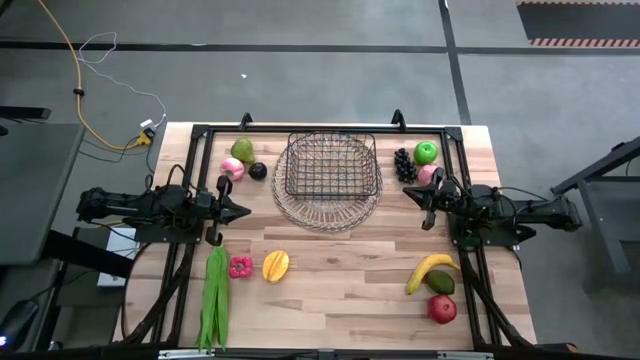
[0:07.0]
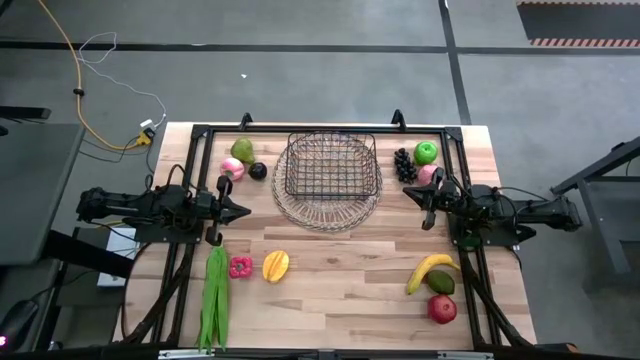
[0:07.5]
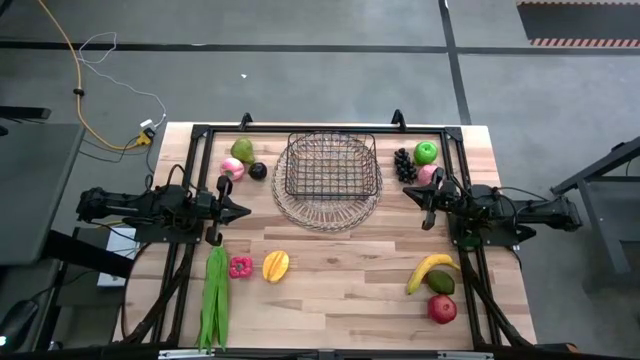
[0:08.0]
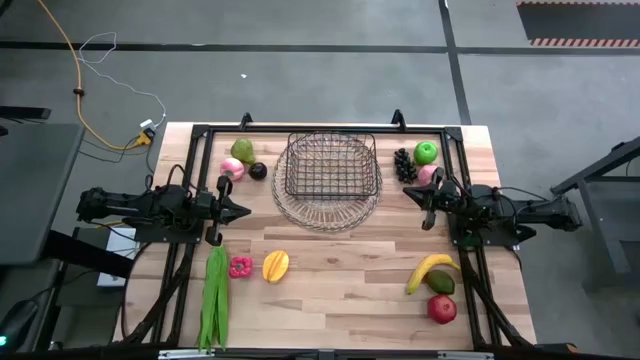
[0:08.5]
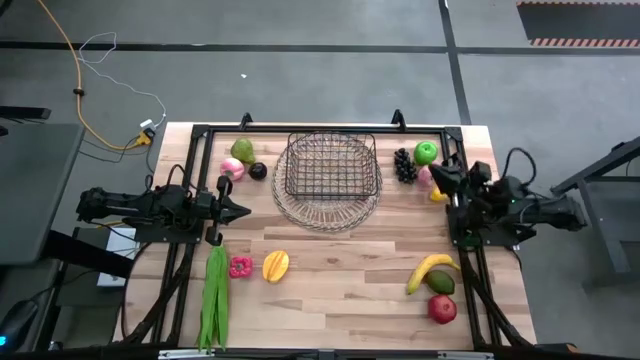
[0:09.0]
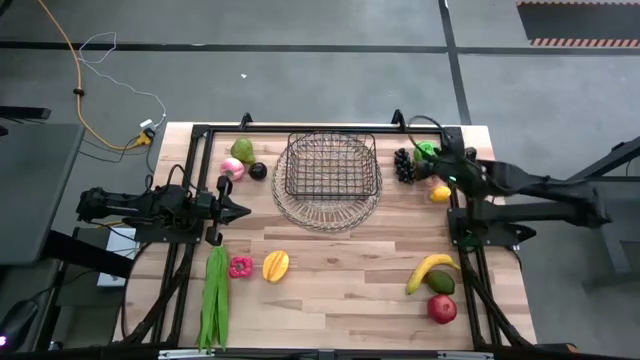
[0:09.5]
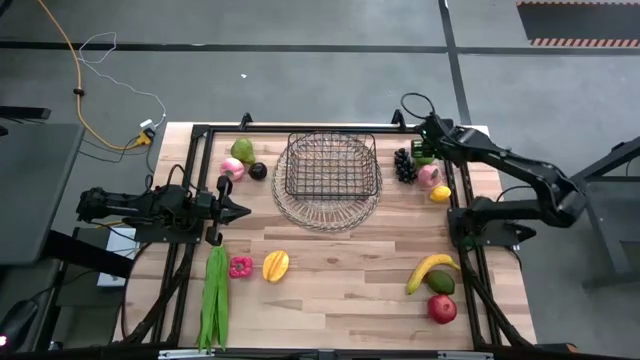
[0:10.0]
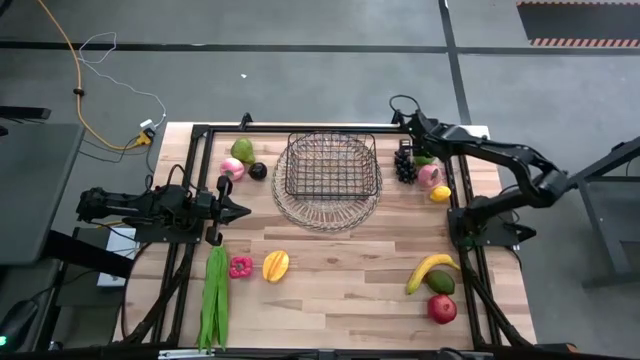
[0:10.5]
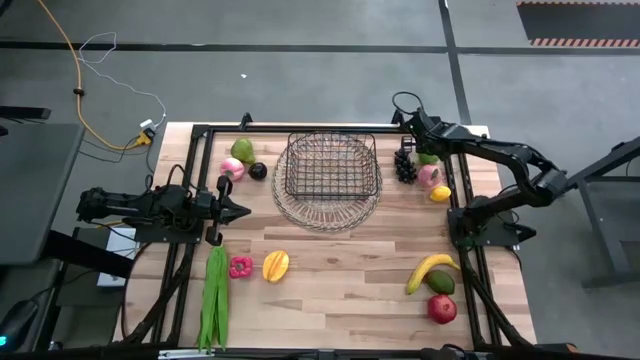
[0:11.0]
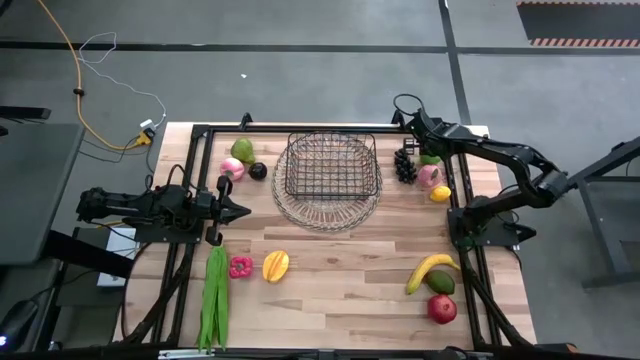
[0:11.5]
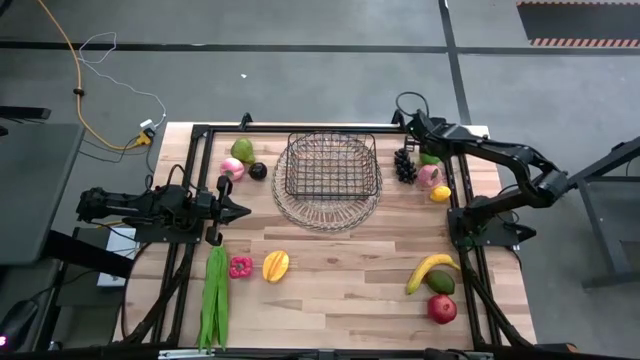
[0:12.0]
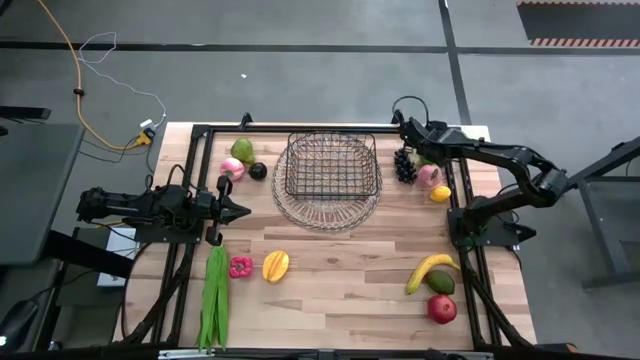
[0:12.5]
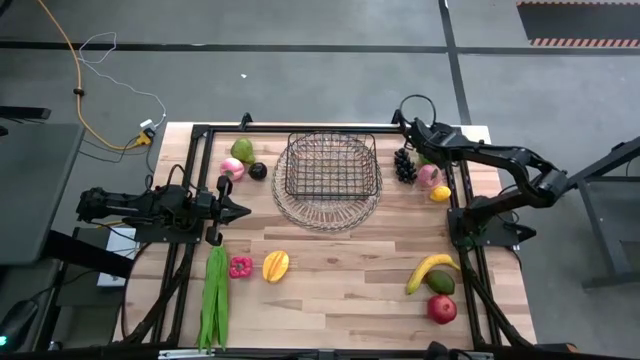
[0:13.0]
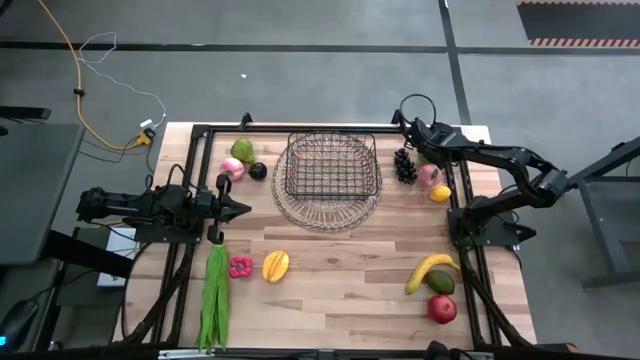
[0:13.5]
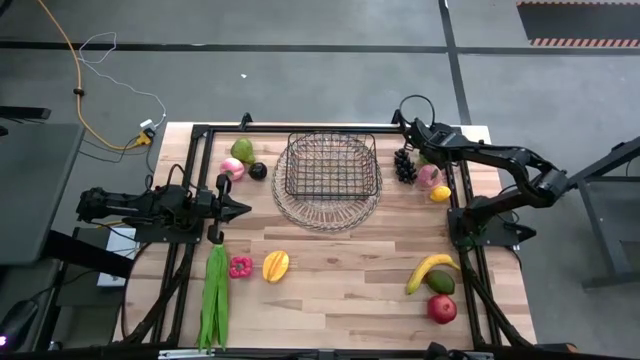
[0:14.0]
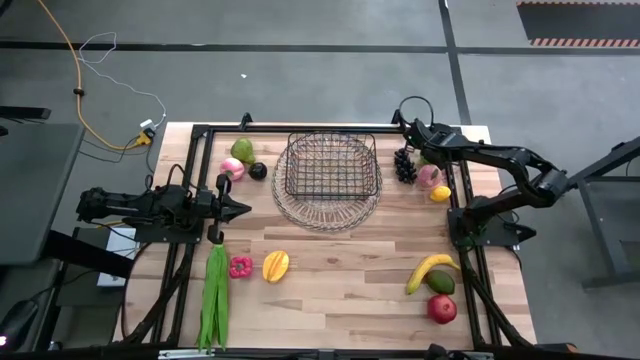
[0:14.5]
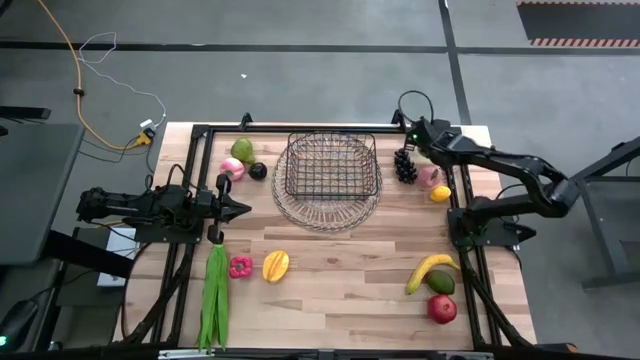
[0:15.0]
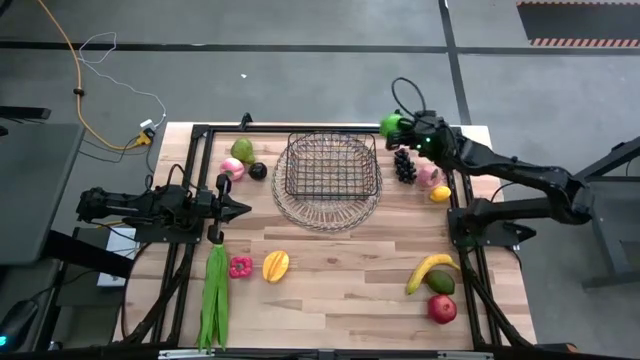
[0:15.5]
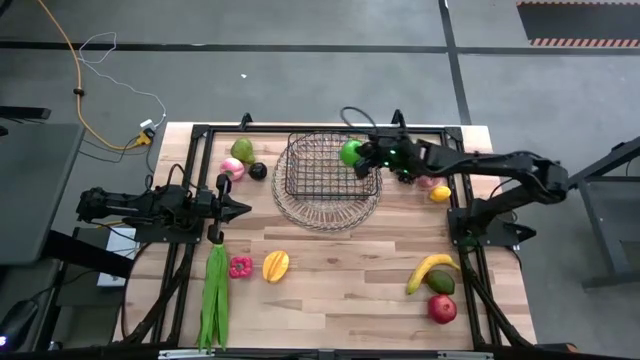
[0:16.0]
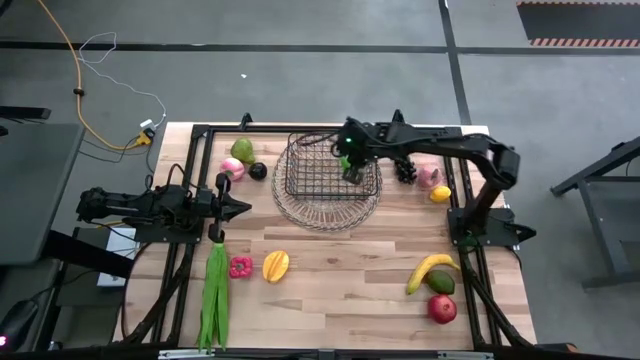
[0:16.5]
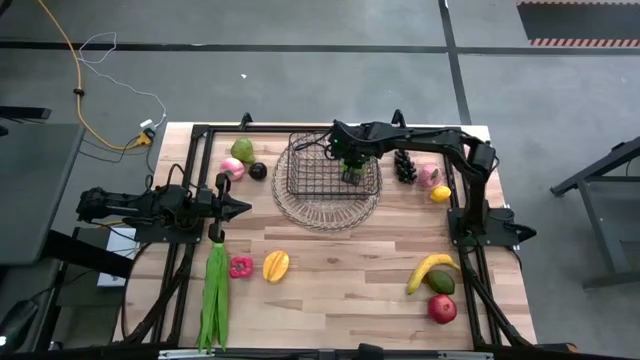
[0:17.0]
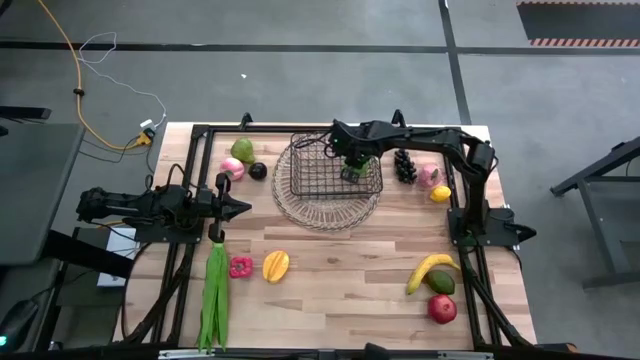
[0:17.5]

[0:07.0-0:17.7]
Task: Build produce basket
Put the green apple into the wire basket

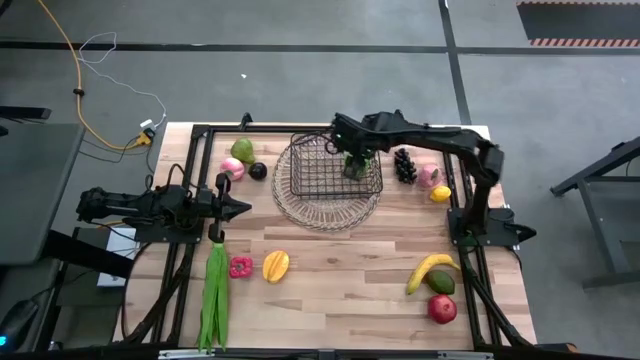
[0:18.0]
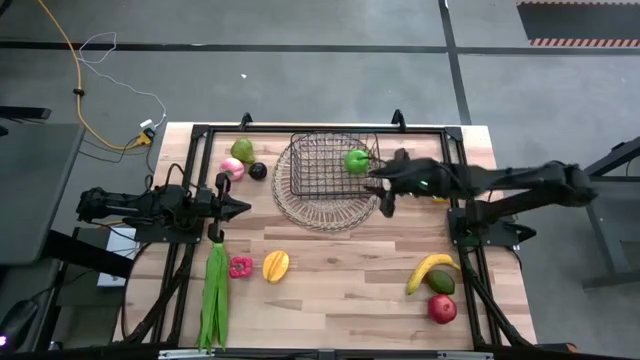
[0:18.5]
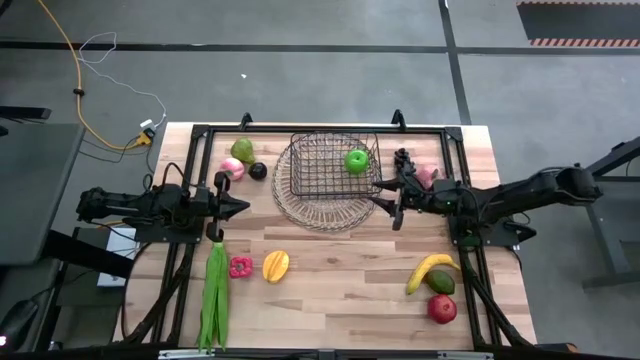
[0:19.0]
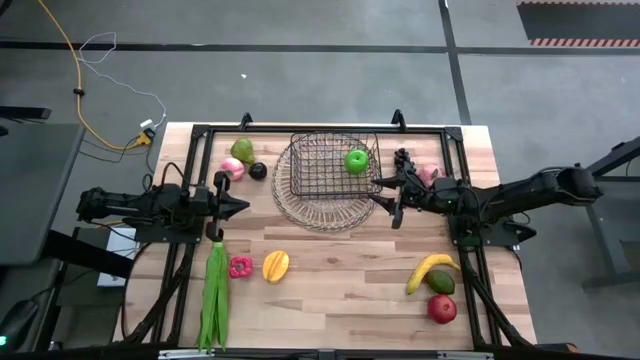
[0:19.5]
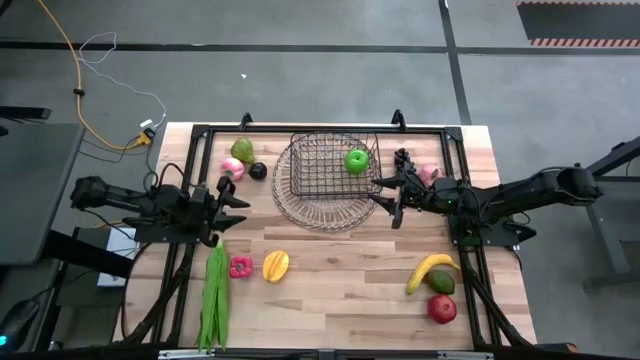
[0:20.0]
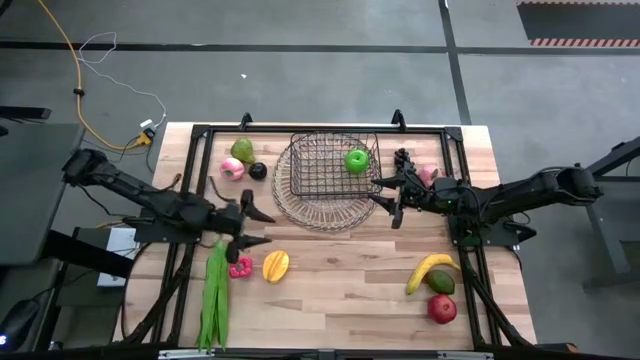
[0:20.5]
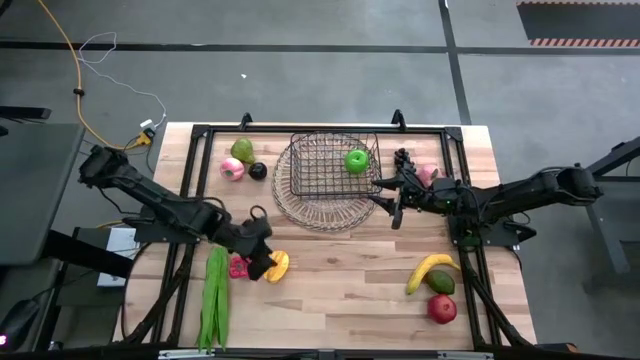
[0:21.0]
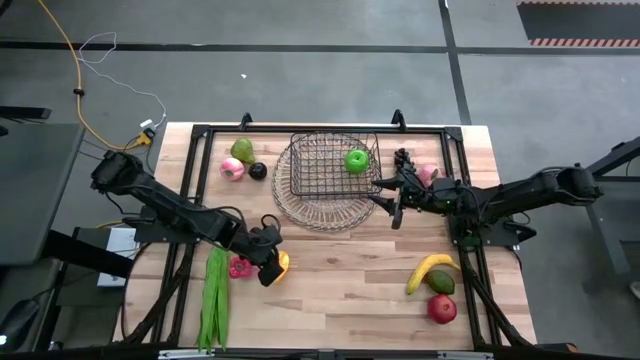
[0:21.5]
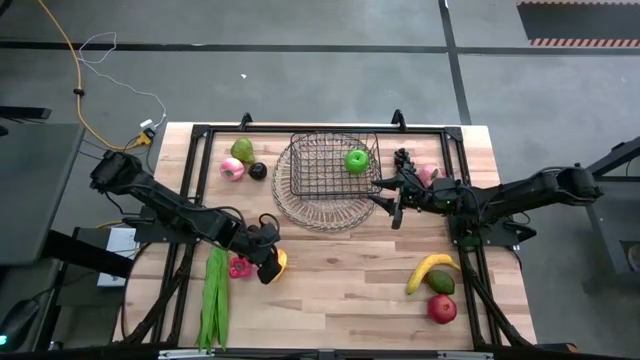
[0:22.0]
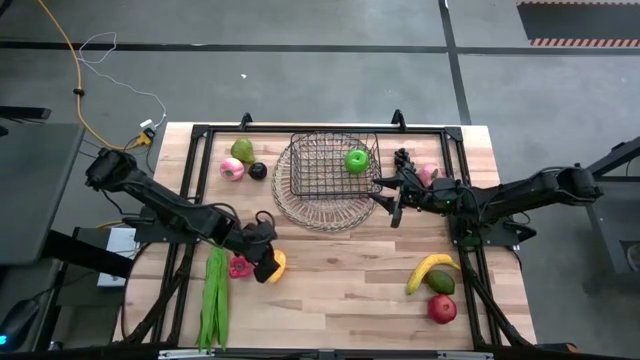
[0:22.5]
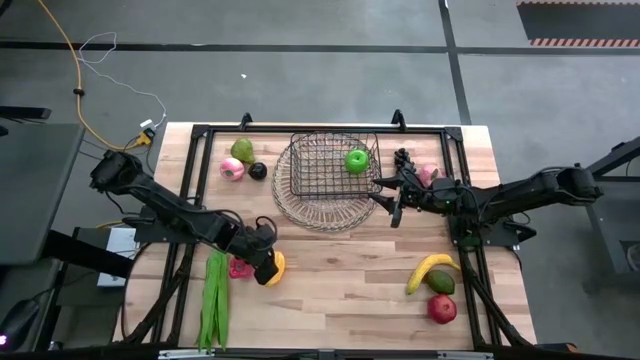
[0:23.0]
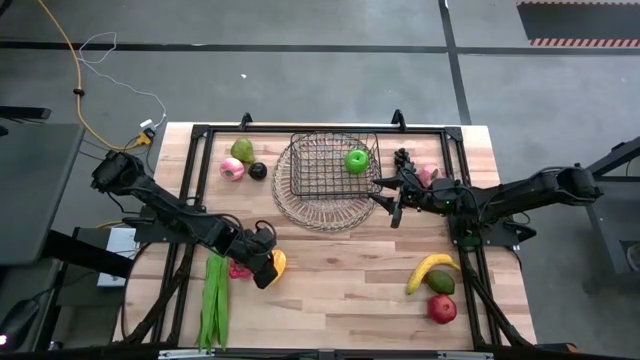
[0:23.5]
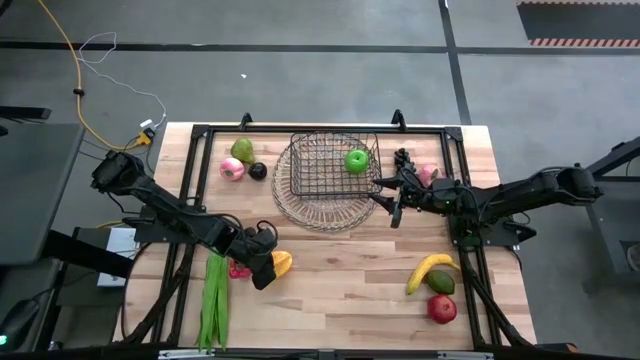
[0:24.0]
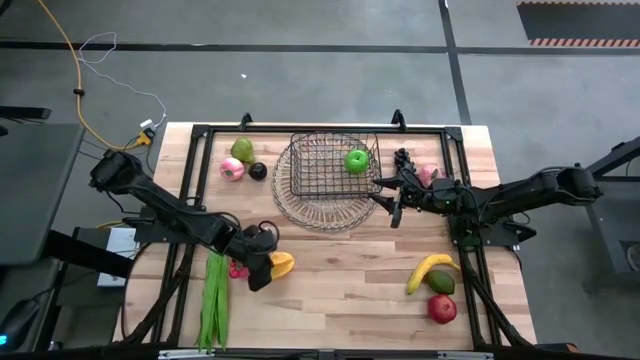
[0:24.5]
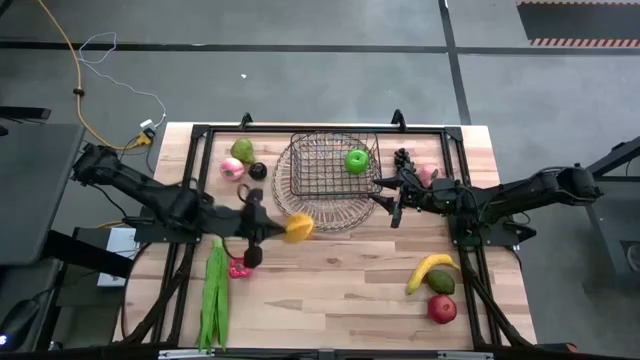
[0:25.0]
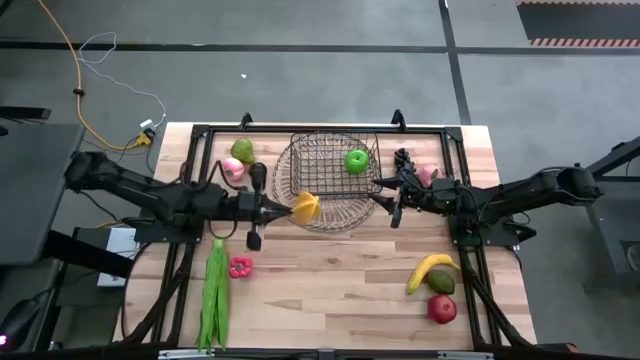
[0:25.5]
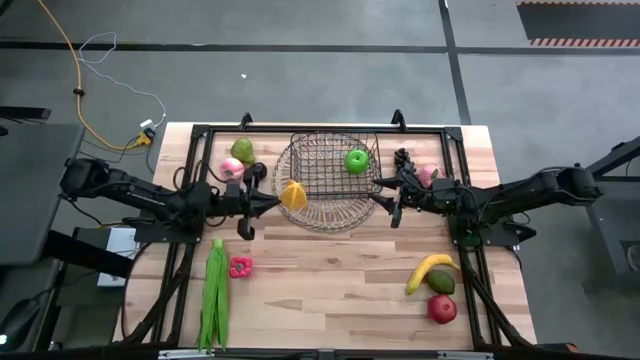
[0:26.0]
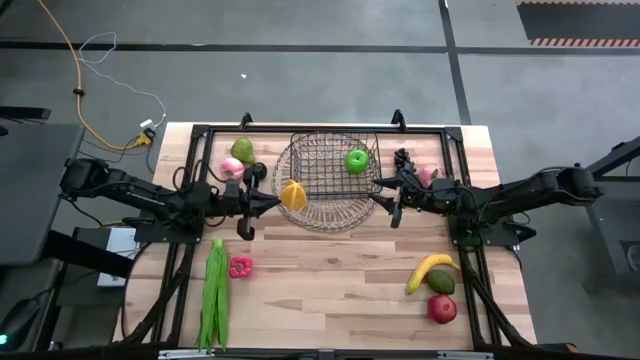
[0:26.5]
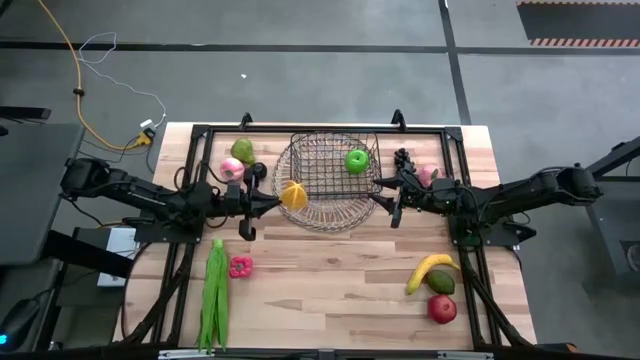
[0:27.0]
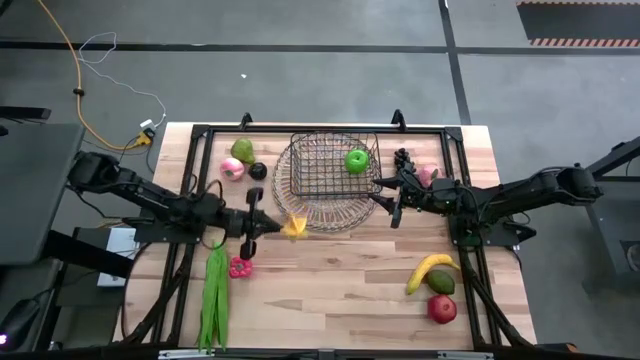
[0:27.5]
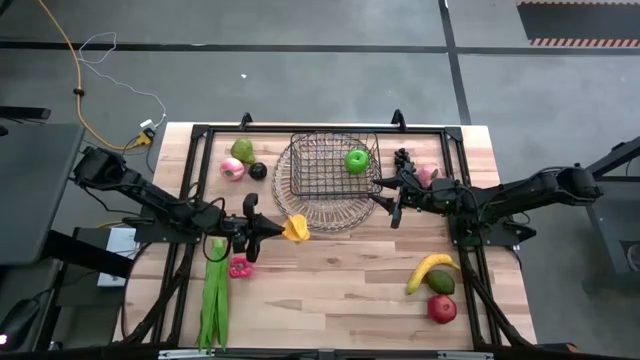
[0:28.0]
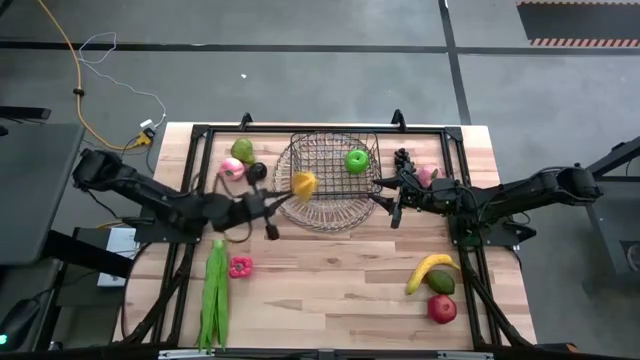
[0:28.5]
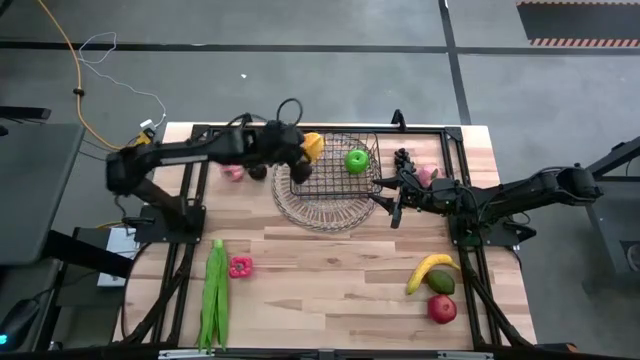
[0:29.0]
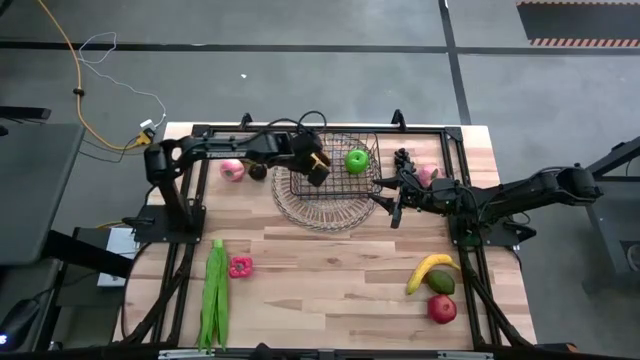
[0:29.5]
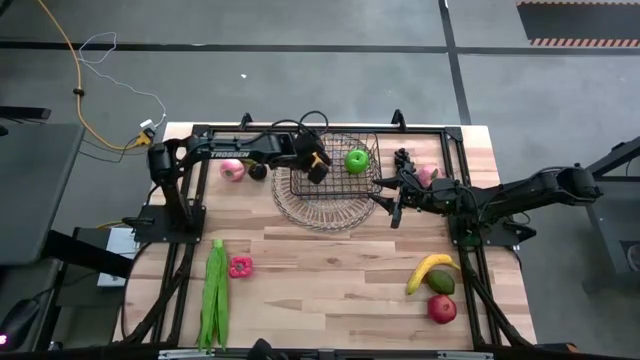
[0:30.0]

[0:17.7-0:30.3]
Put the starfruit into the wire basket
